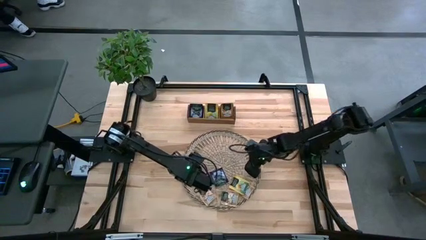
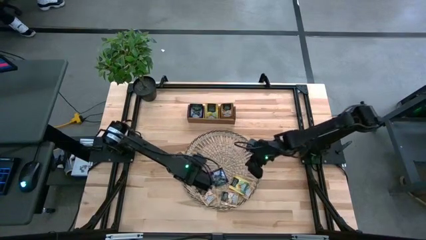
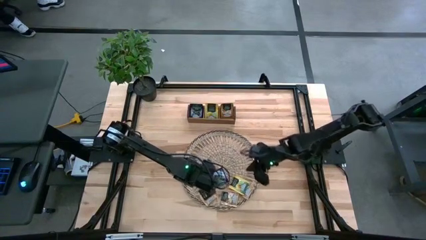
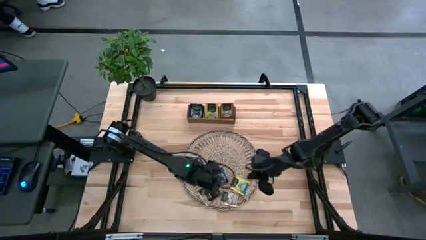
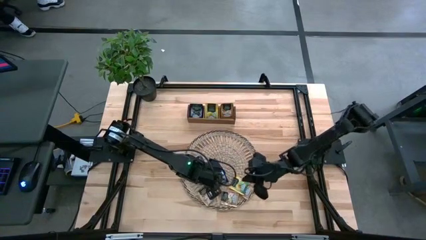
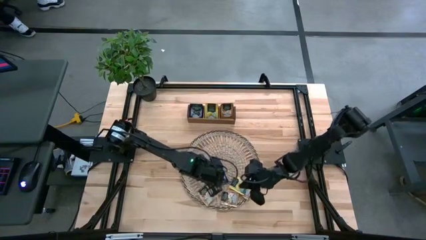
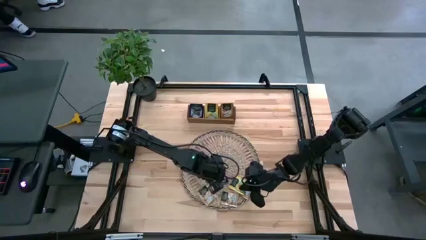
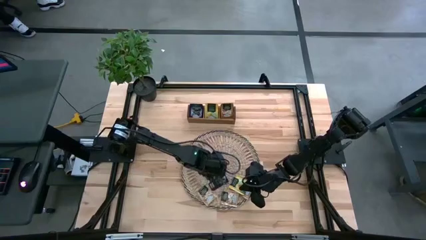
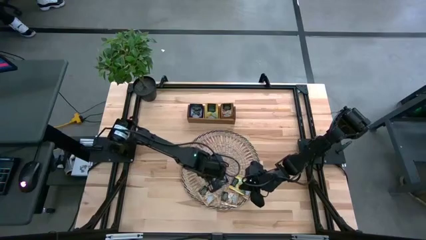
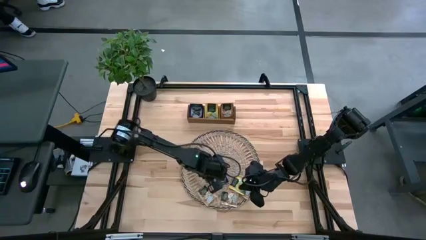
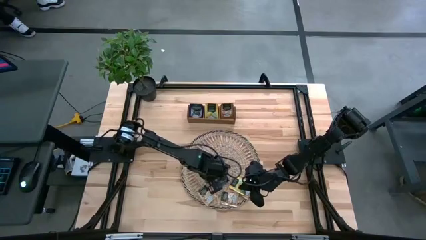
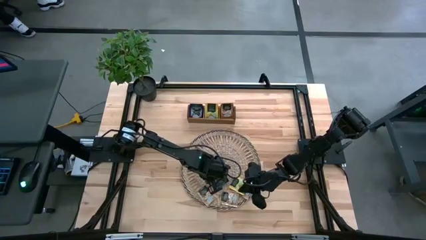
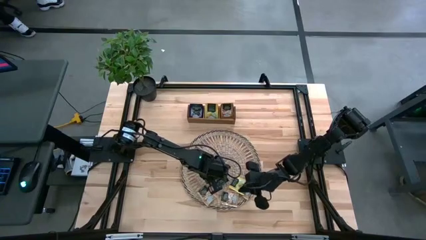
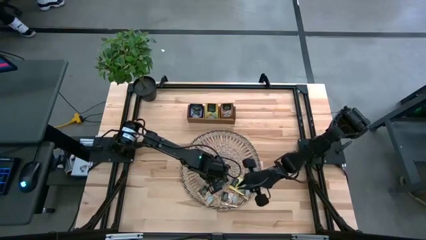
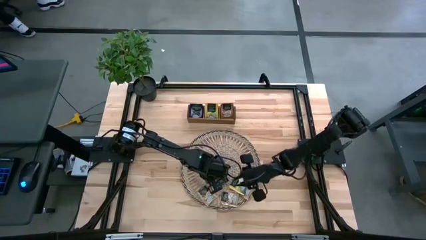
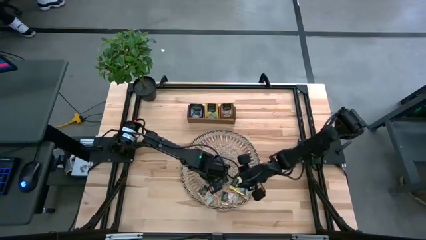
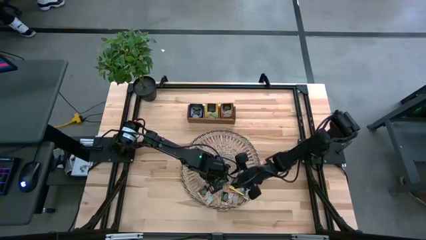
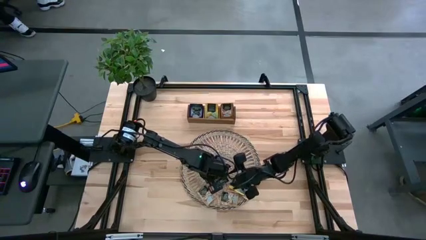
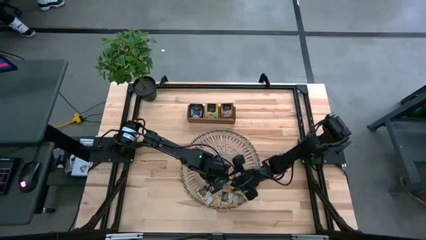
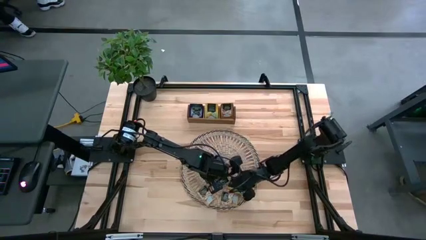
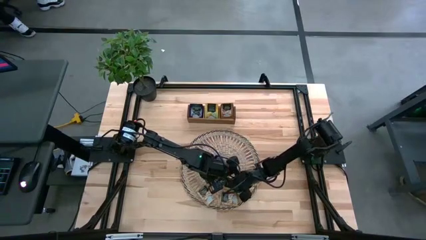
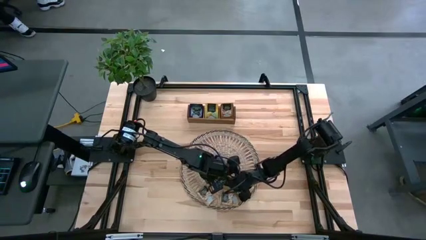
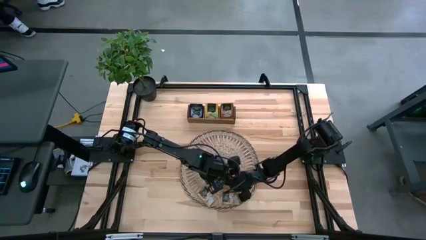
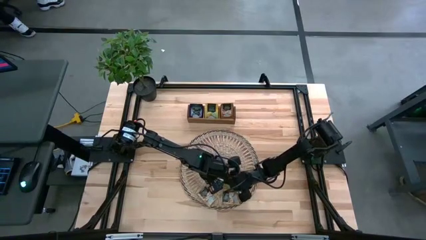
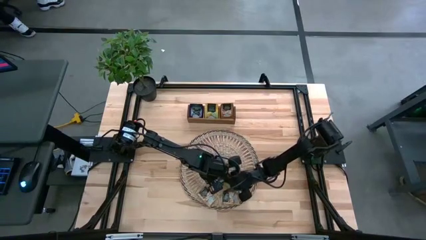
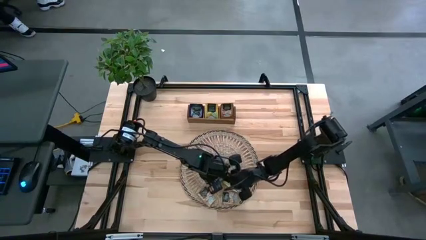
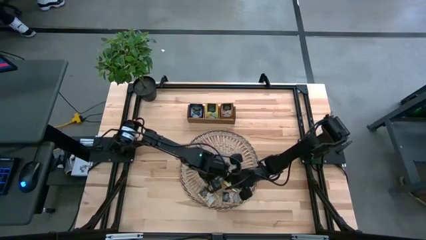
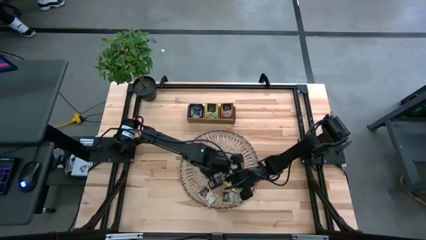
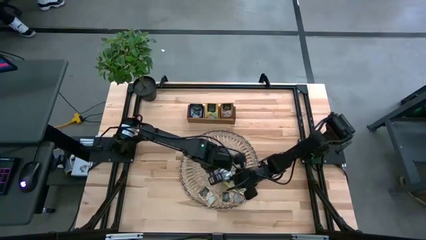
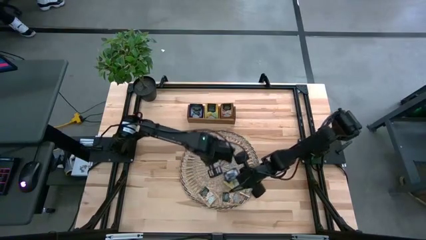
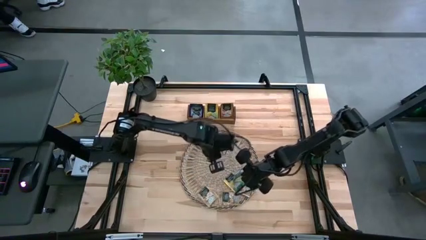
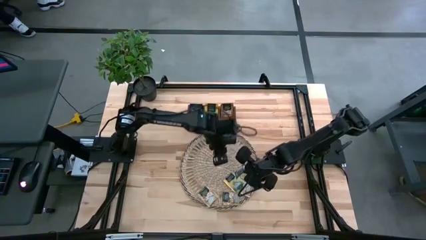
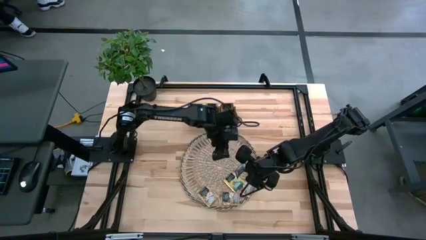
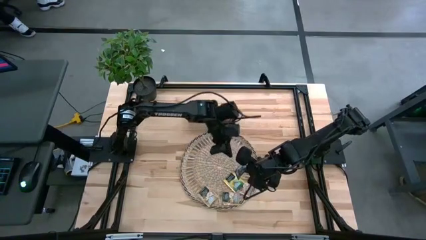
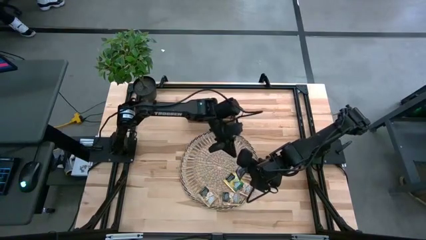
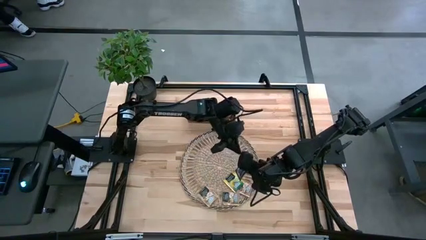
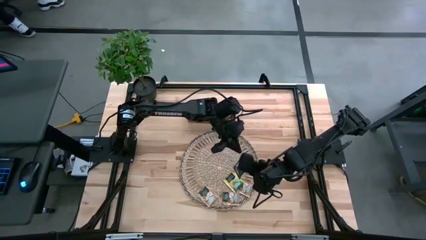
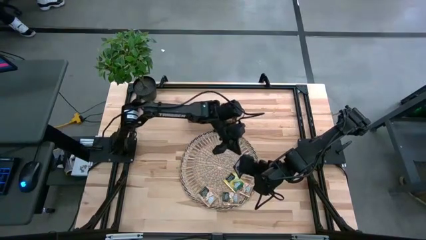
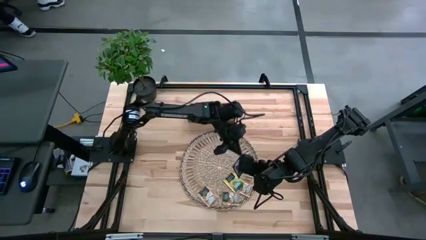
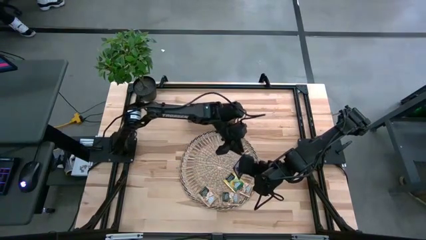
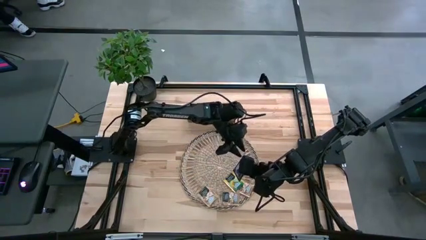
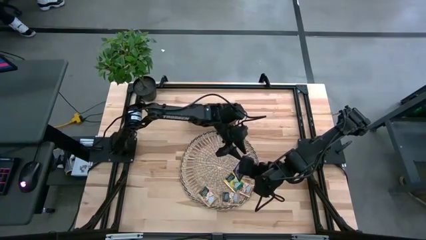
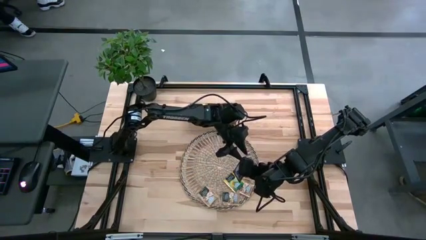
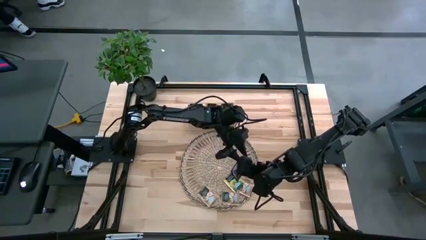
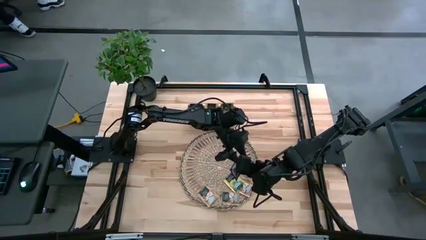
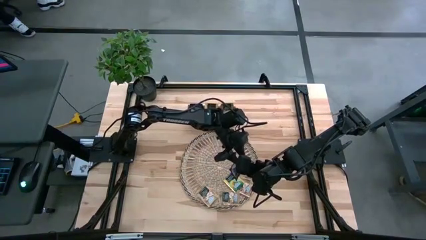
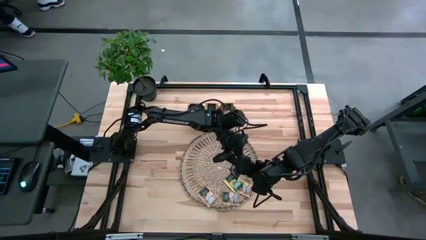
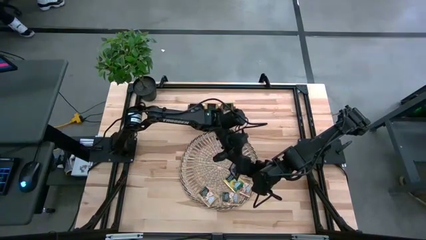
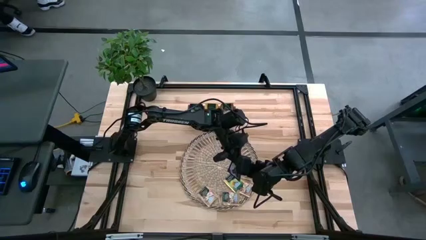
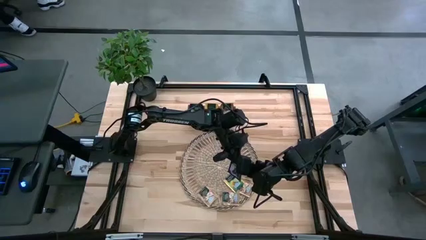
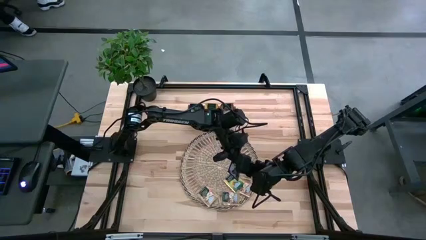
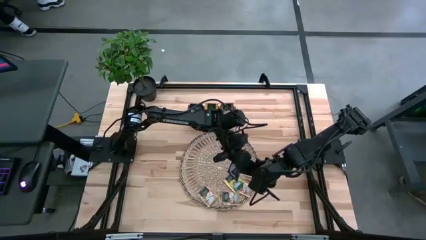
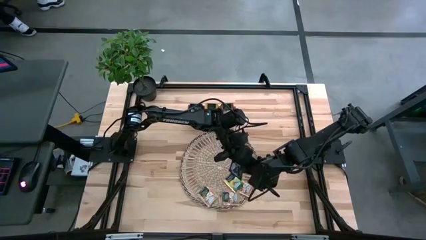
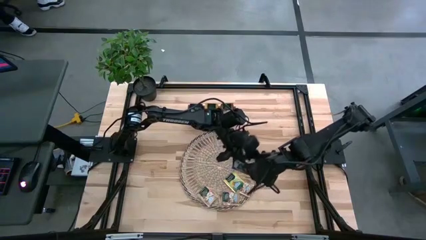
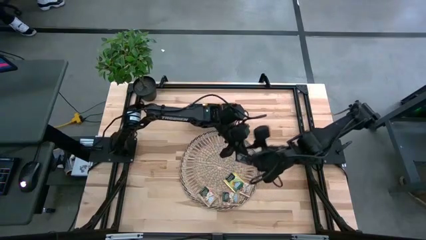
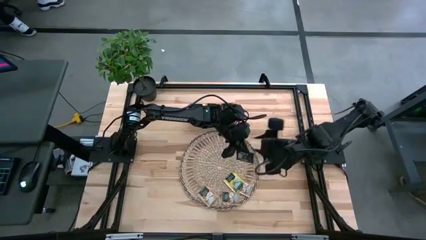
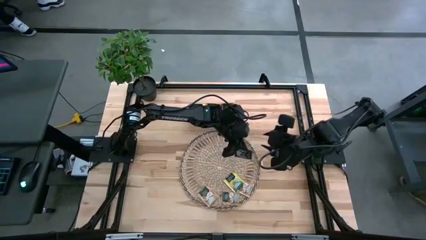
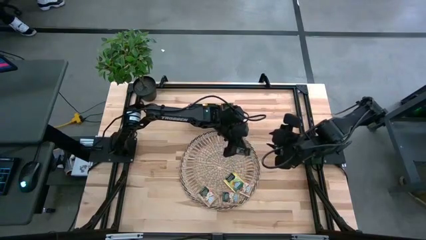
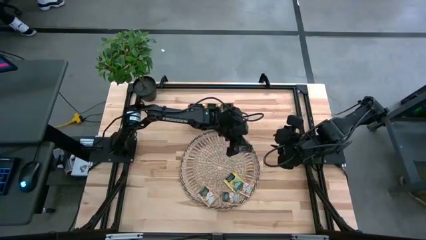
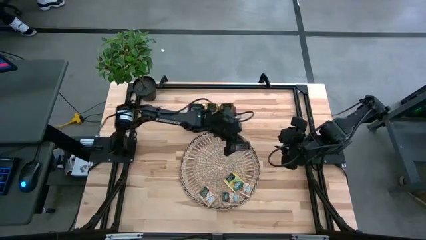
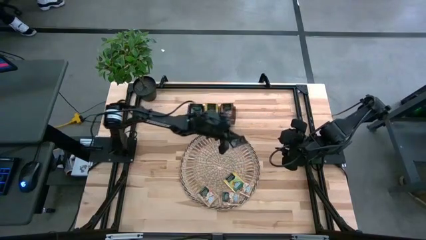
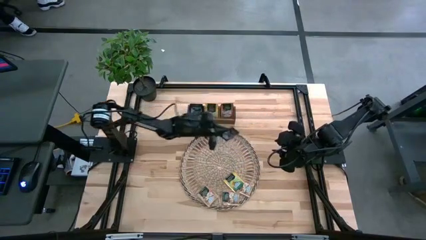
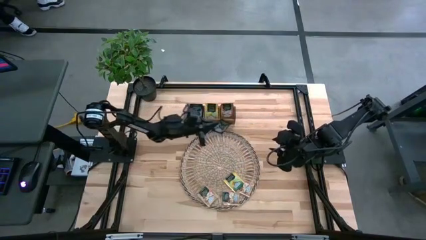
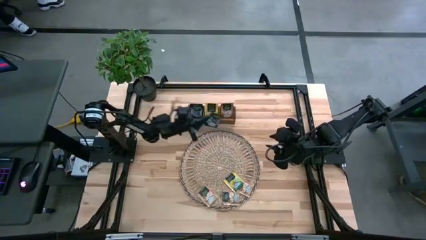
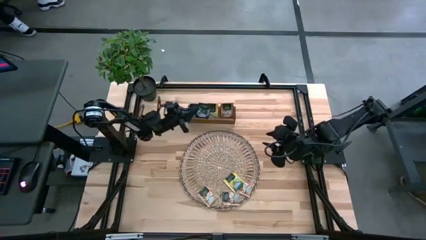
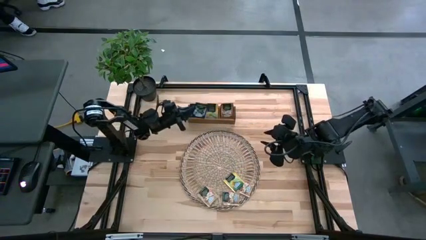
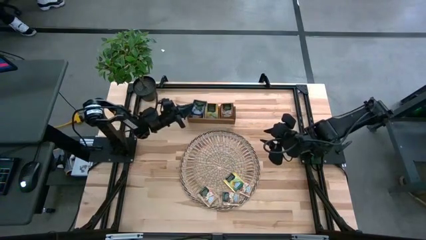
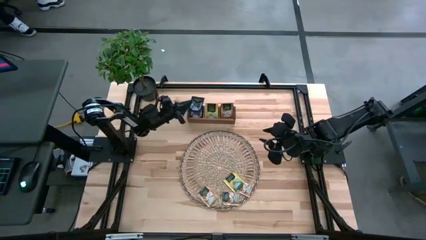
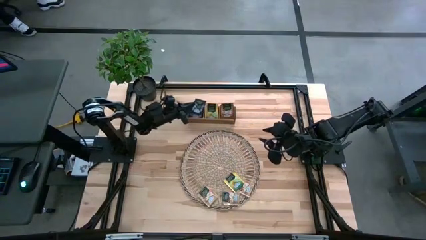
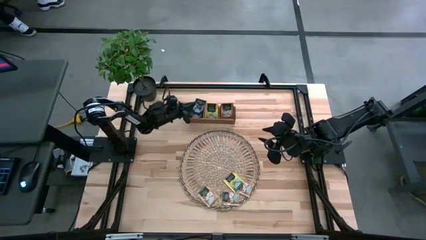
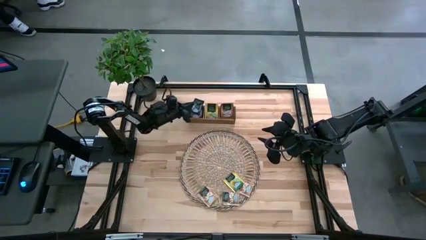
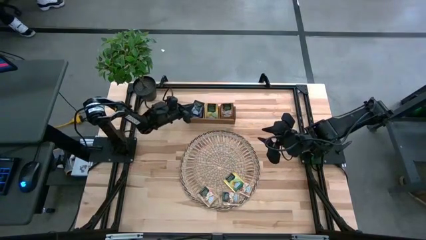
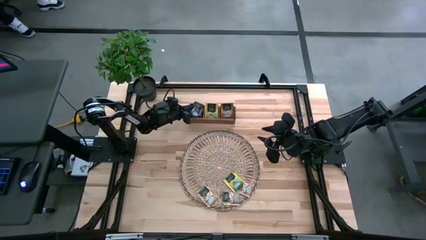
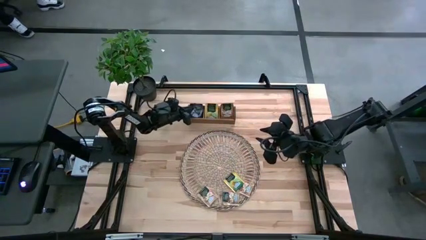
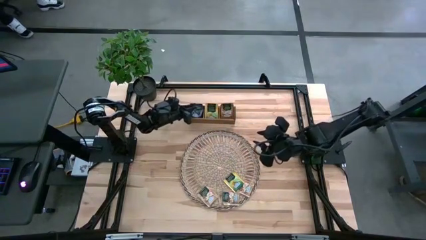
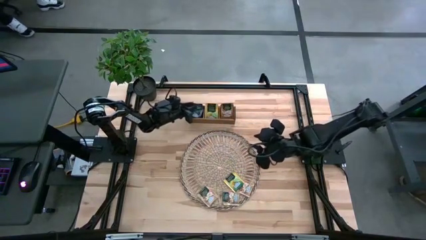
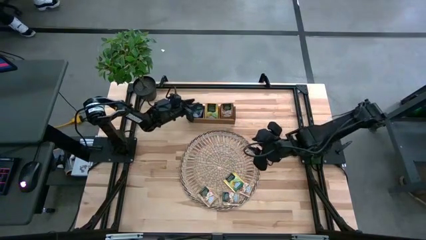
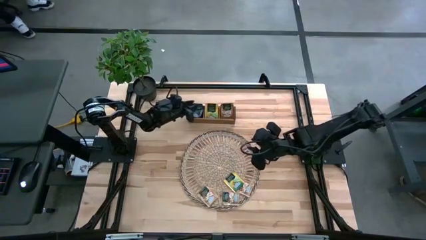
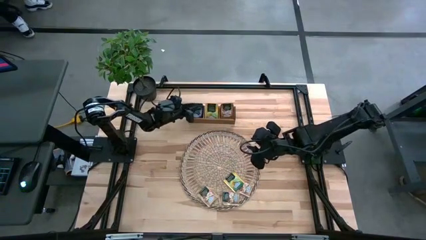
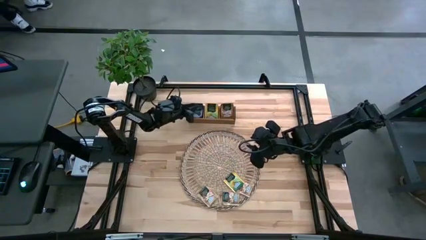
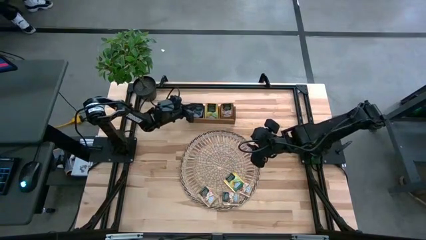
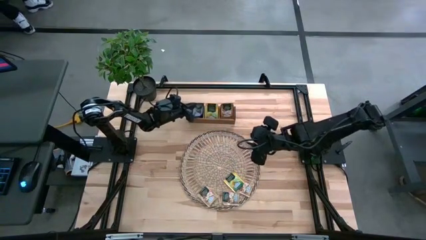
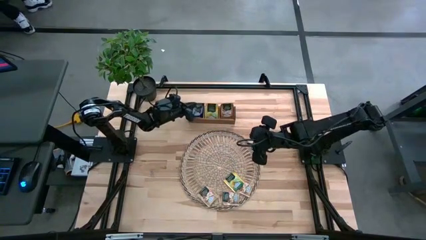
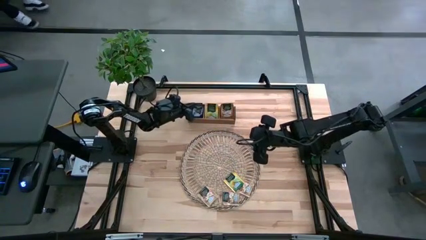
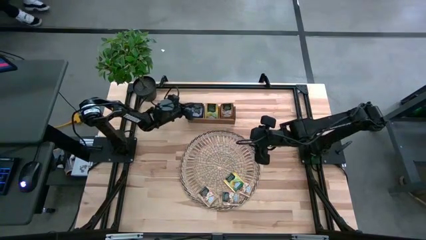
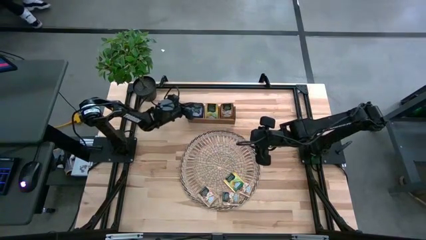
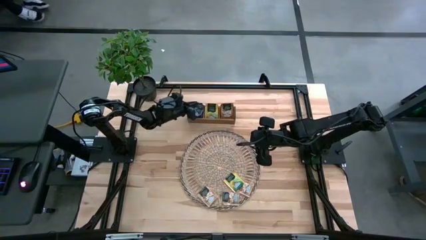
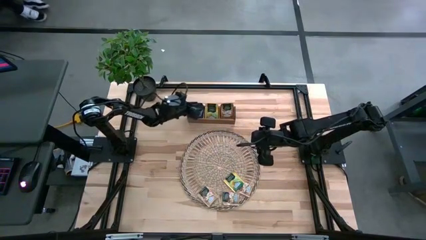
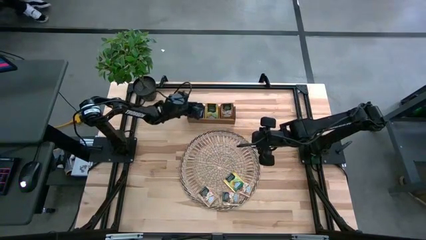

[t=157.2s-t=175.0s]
Task: Pick & Place Tea
Put the purple tea bag in the left section of the wooden organizer
